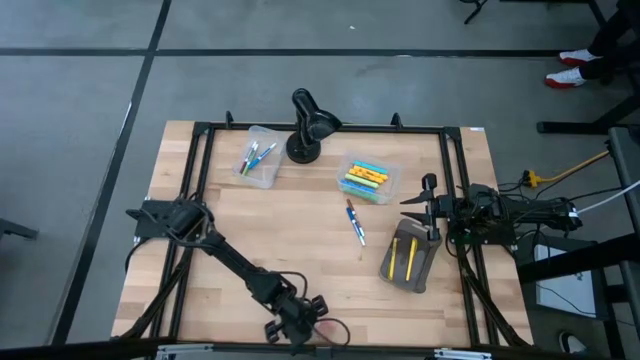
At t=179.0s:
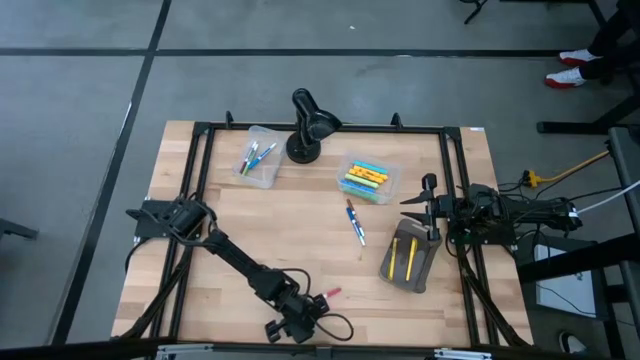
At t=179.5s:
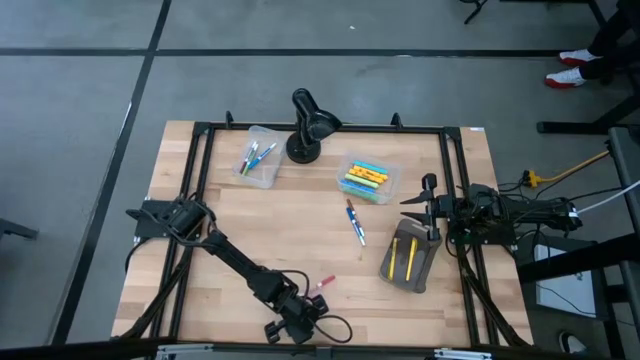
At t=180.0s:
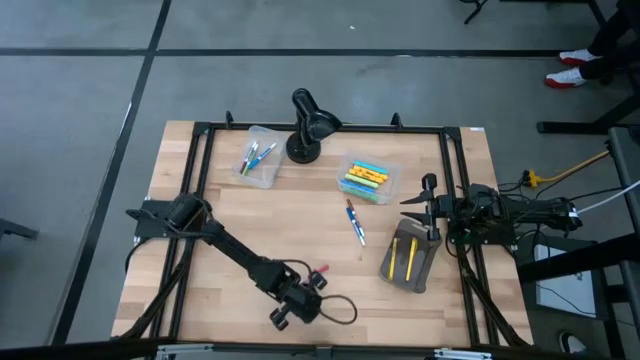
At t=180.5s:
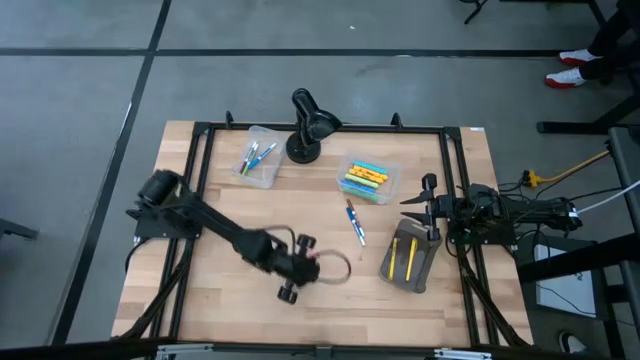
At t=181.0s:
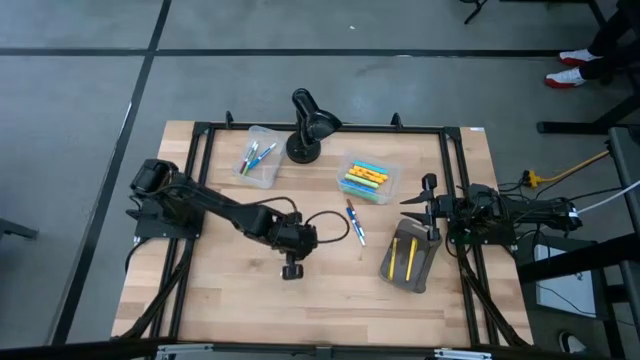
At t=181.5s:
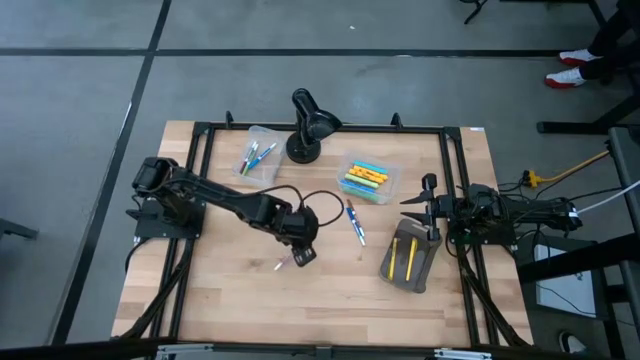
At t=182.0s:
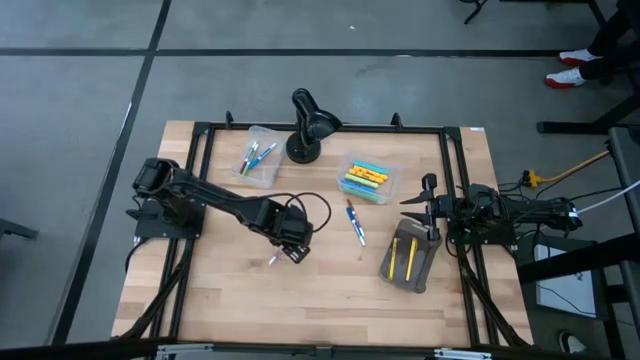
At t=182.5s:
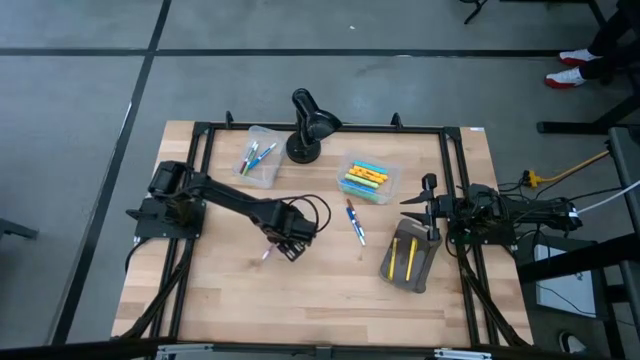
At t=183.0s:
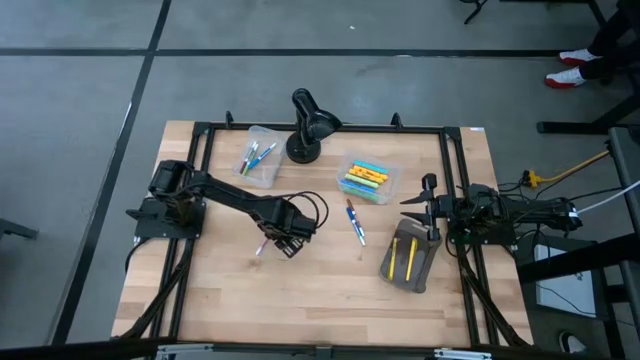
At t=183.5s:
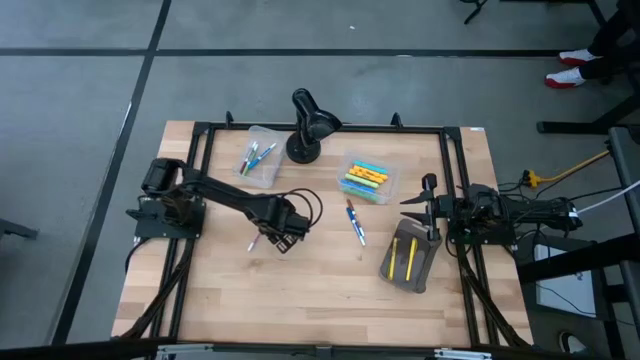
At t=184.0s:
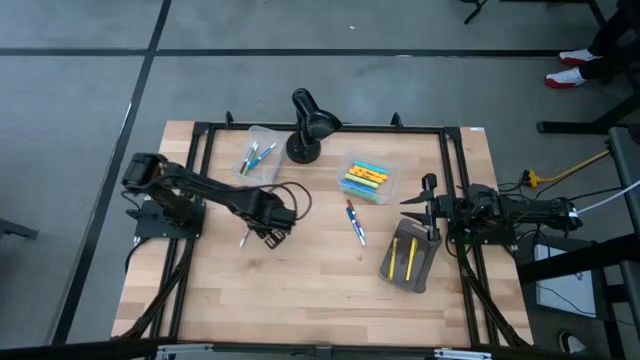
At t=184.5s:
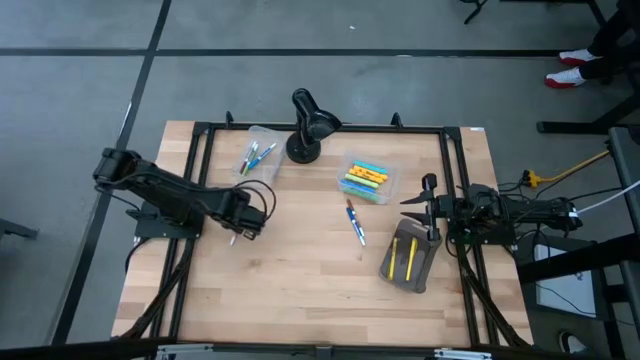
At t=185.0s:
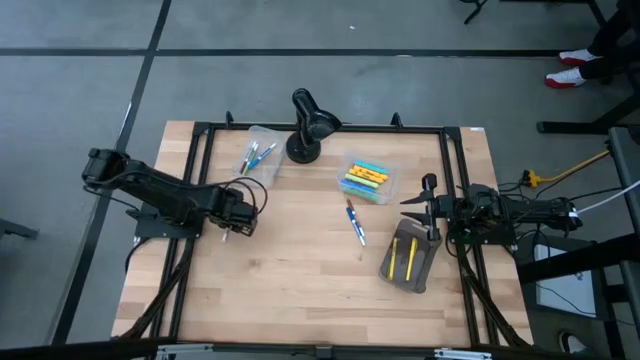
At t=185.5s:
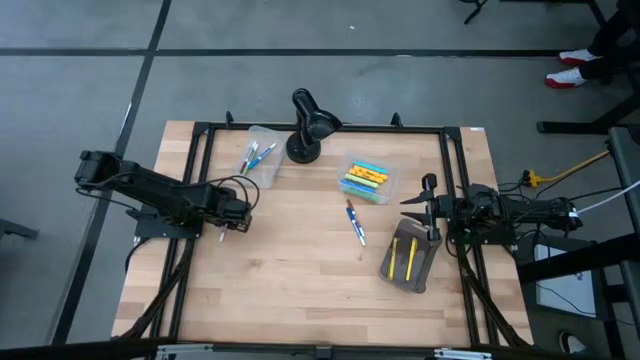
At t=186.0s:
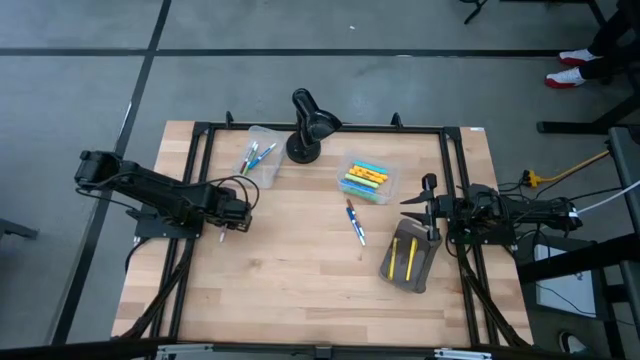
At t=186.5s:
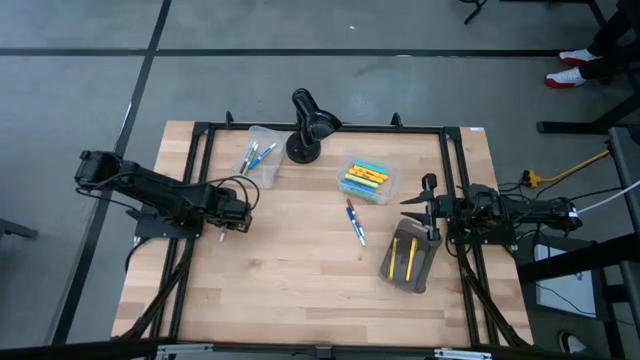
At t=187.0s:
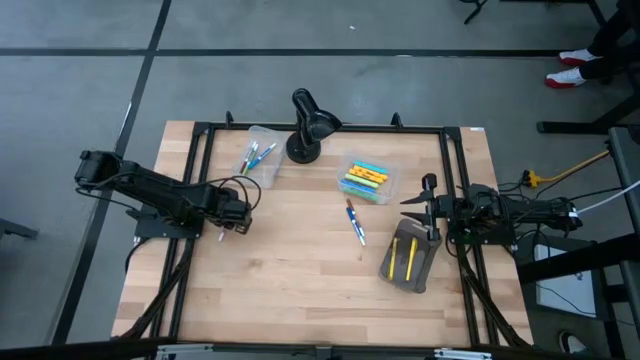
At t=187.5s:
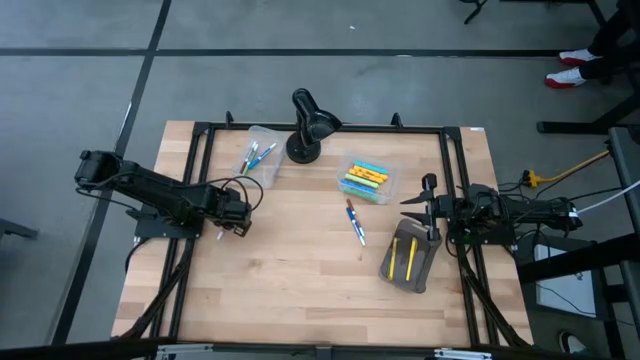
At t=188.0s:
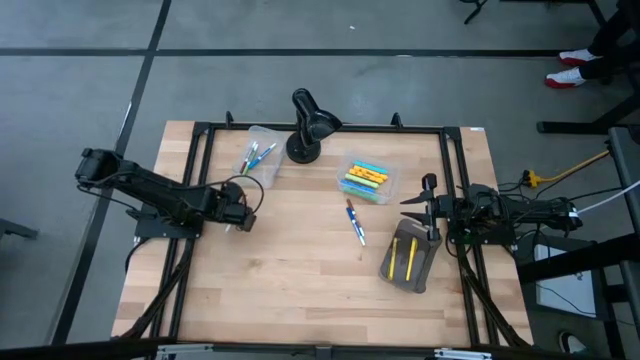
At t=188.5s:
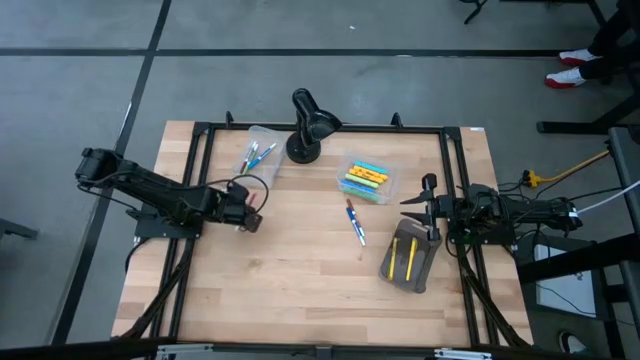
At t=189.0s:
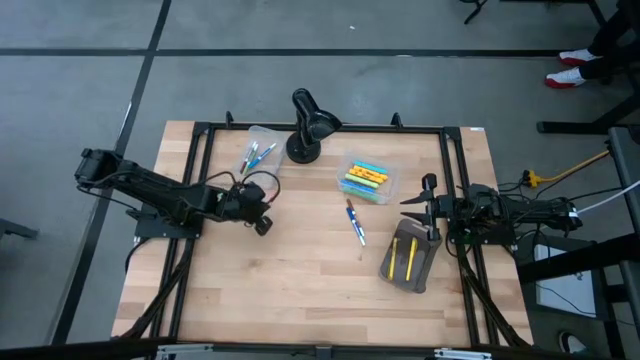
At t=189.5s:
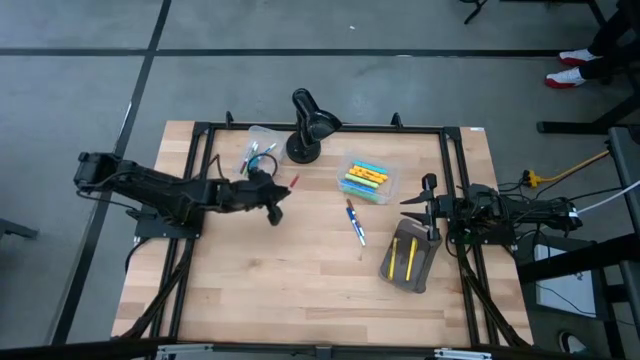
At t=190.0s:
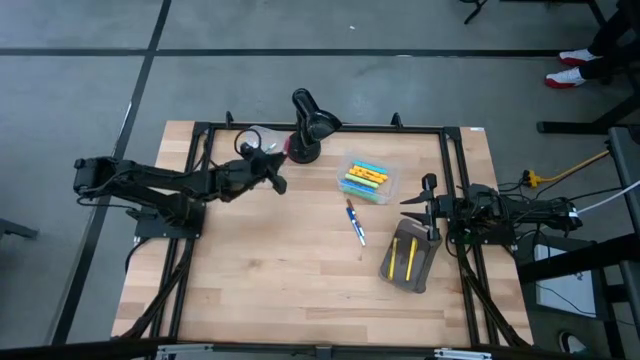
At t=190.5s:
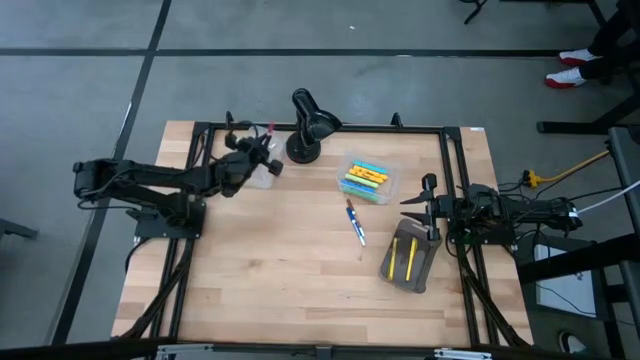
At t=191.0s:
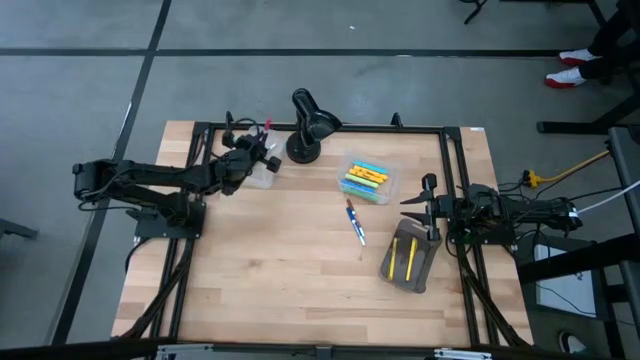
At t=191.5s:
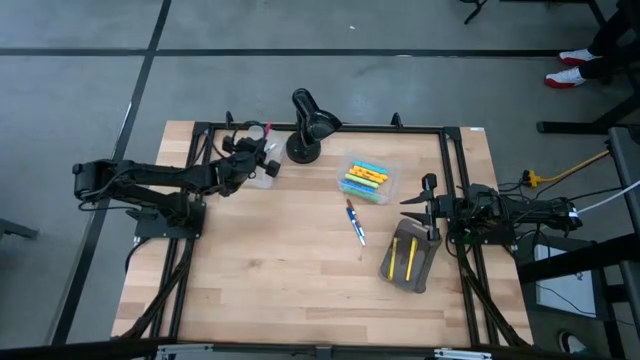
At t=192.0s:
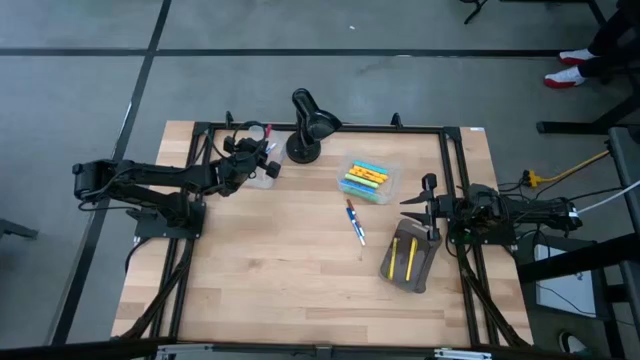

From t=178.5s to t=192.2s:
Task: Pick & Place Markers
Put the pink marker pen into the left transparent bin

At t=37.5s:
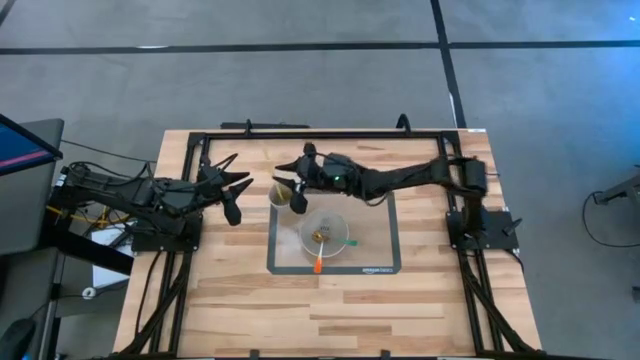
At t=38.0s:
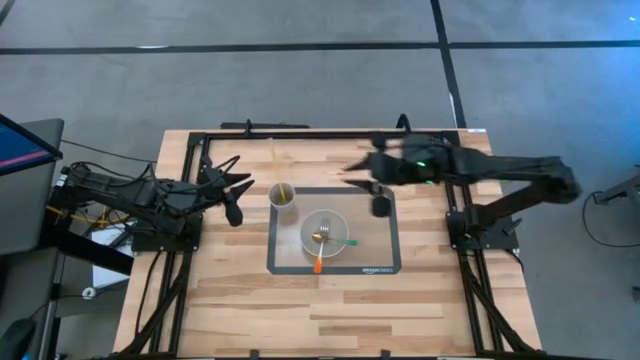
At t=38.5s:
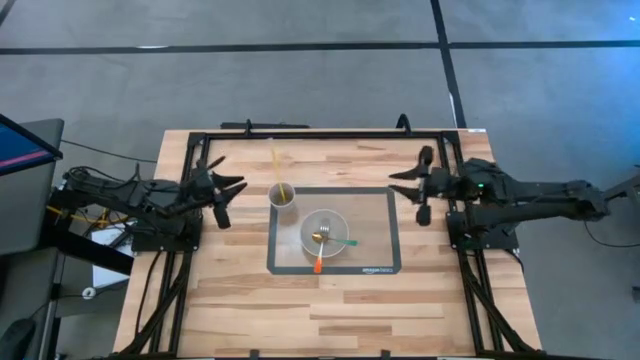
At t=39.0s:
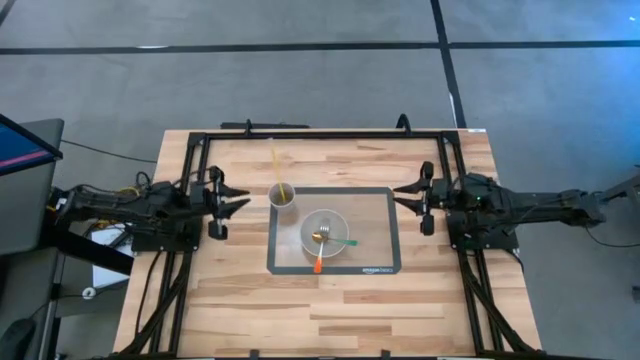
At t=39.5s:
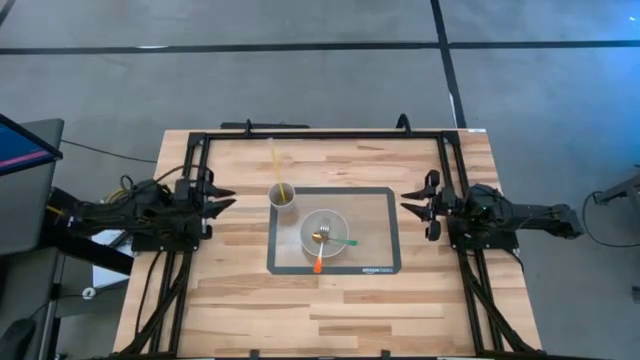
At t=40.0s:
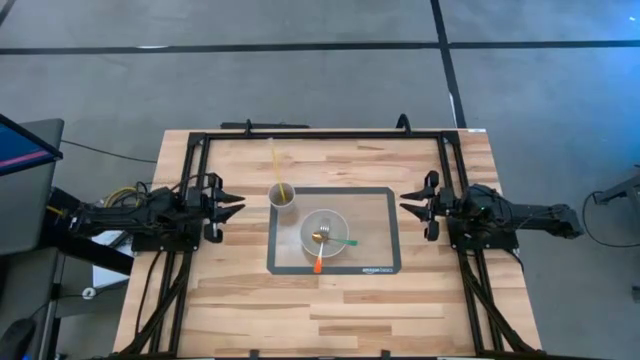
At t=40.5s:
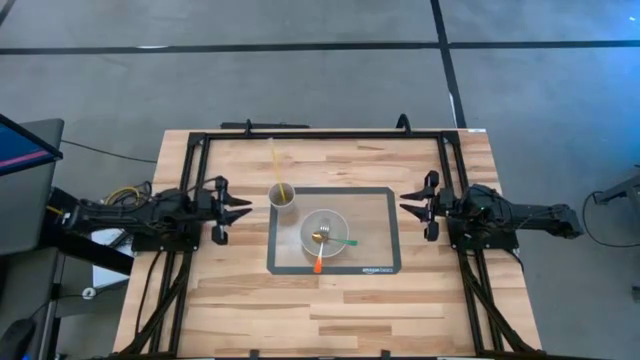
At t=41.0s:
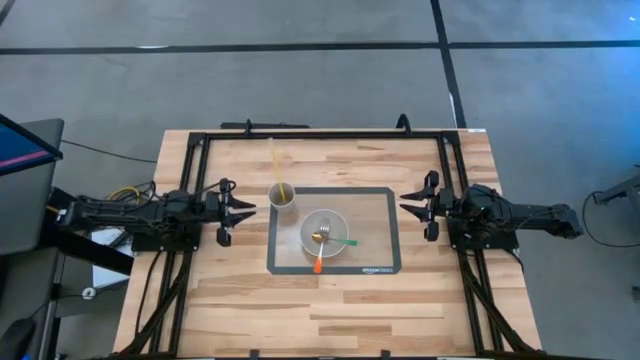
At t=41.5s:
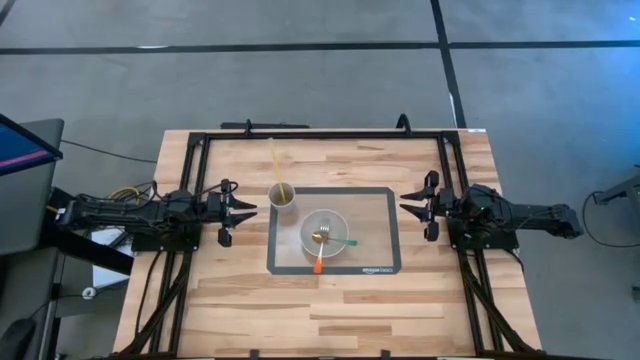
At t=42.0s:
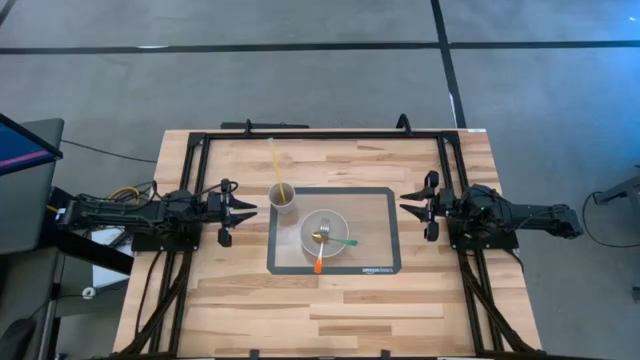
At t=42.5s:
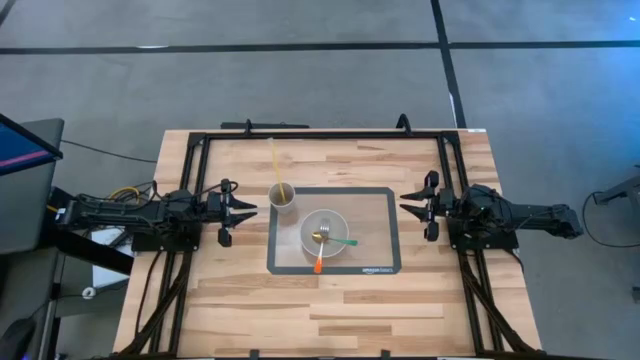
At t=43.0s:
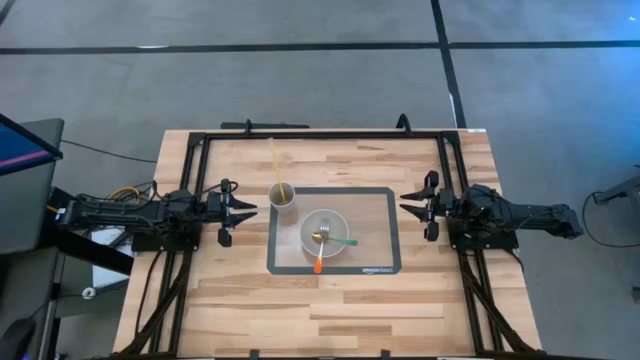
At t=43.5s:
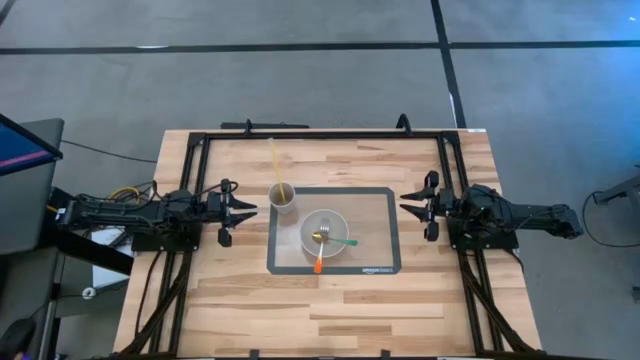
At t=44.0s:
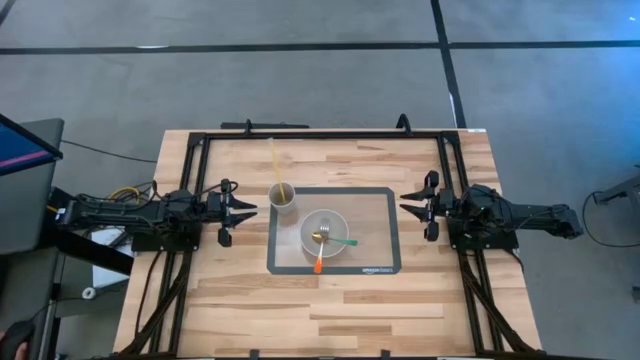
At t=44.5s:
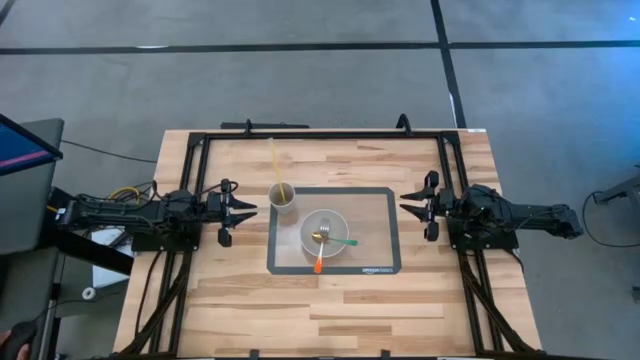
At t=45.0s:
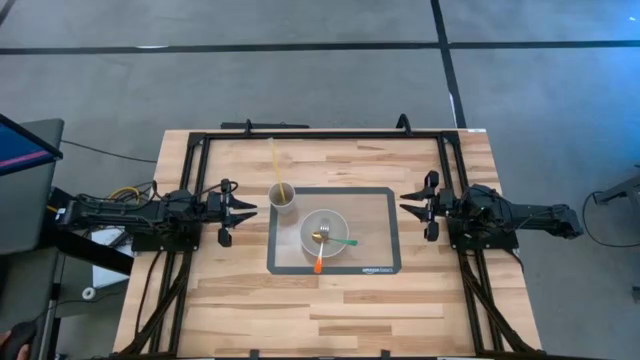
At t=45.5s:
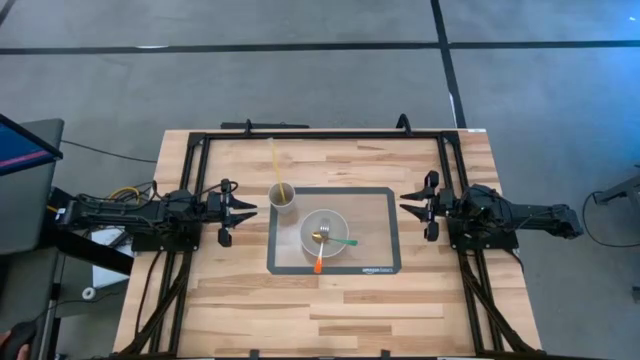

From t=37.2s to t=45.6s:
Task: Pick & Place Utensil
Return to Home Position
